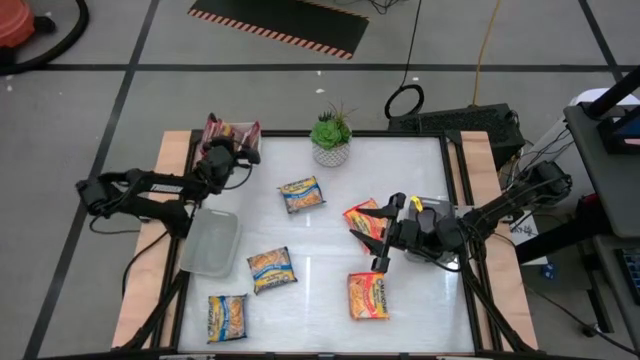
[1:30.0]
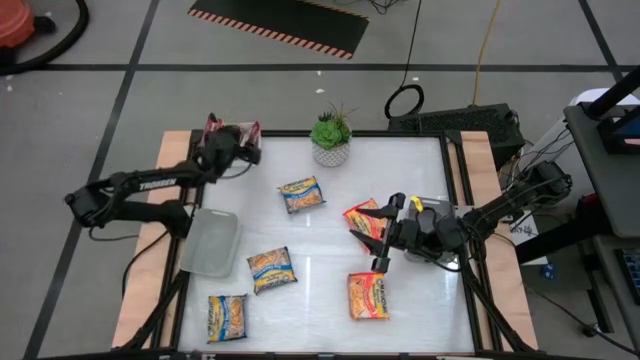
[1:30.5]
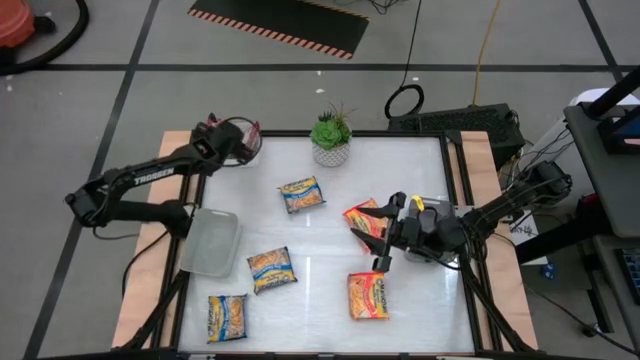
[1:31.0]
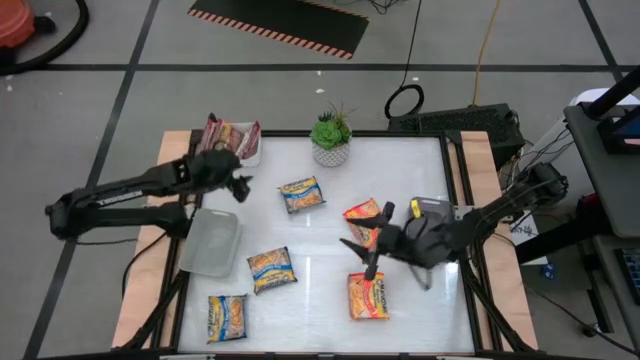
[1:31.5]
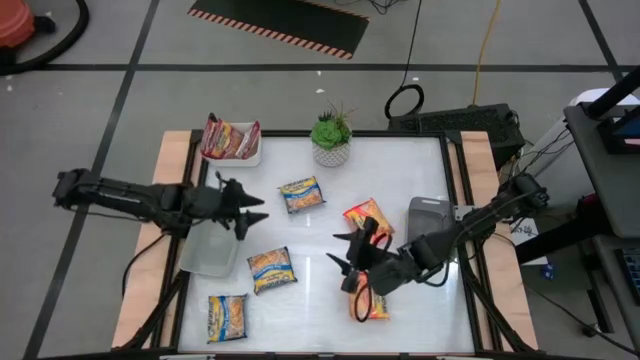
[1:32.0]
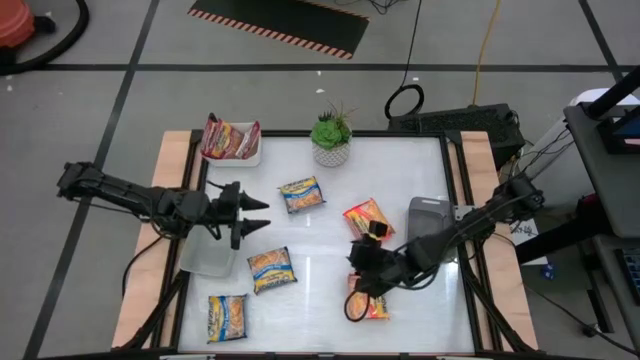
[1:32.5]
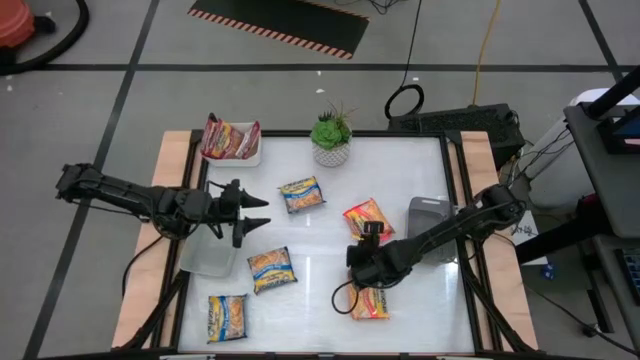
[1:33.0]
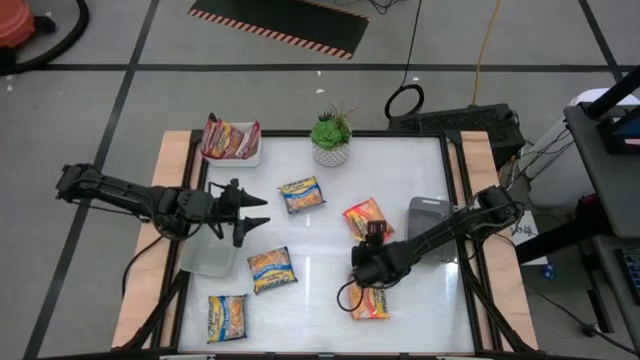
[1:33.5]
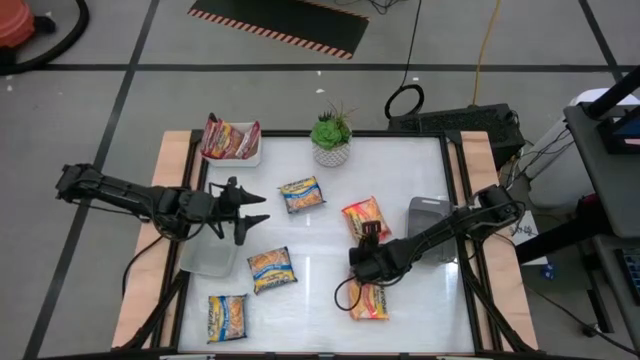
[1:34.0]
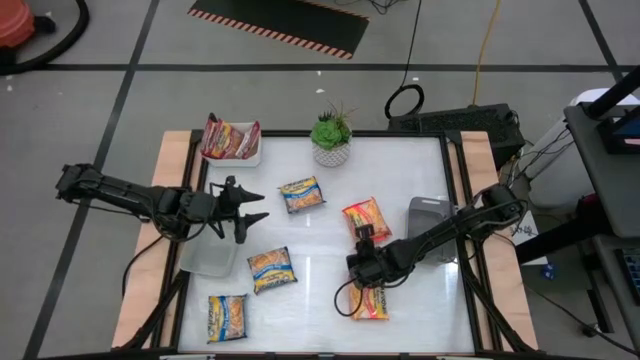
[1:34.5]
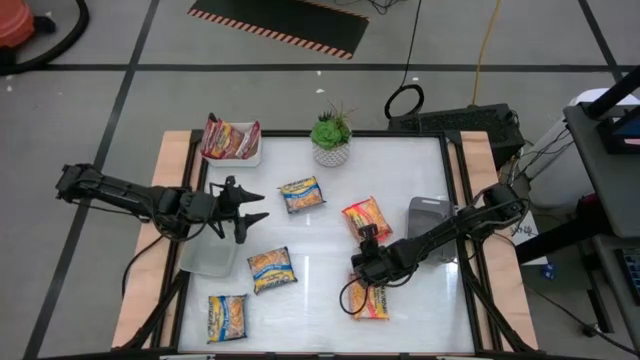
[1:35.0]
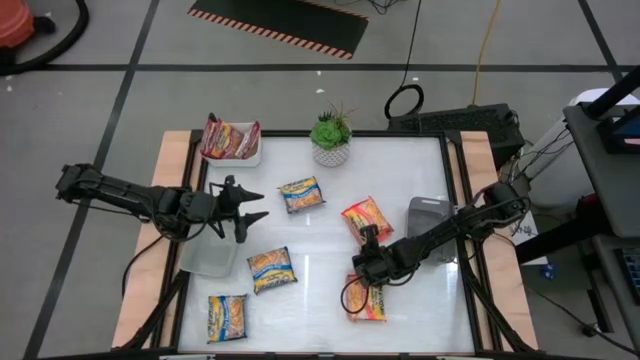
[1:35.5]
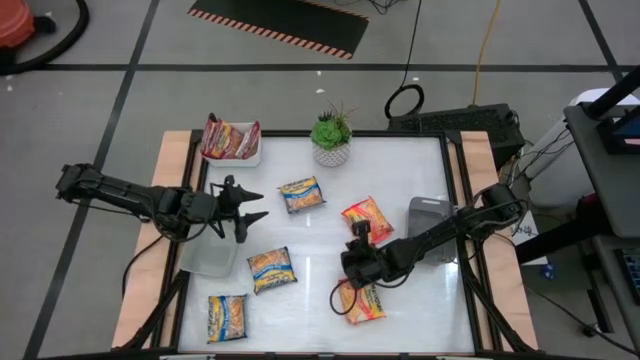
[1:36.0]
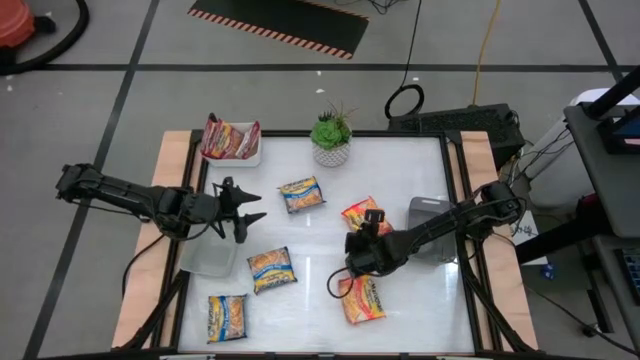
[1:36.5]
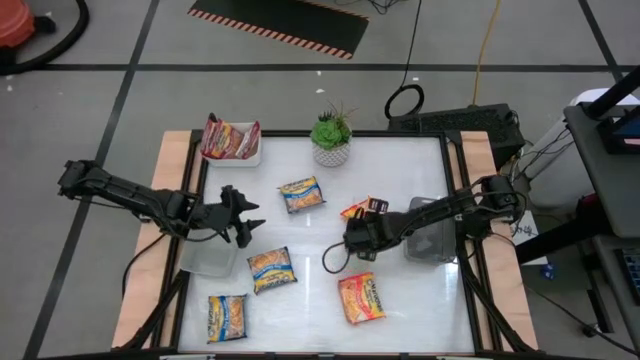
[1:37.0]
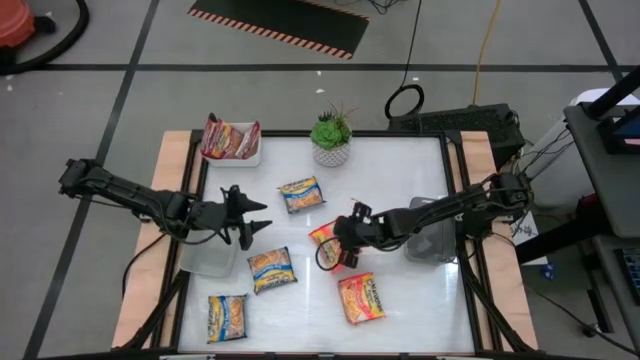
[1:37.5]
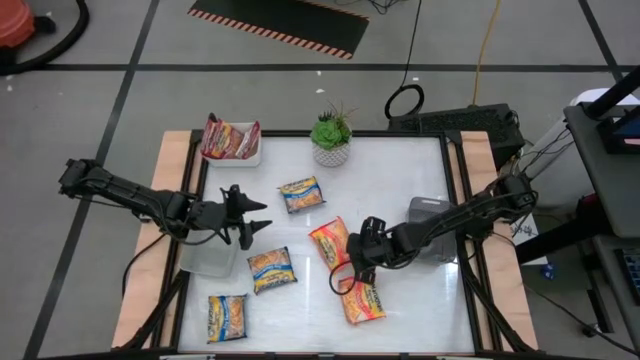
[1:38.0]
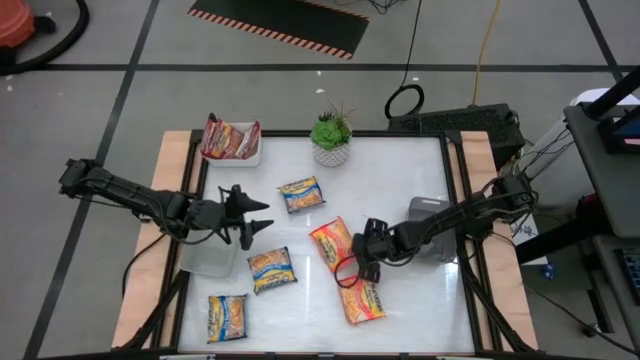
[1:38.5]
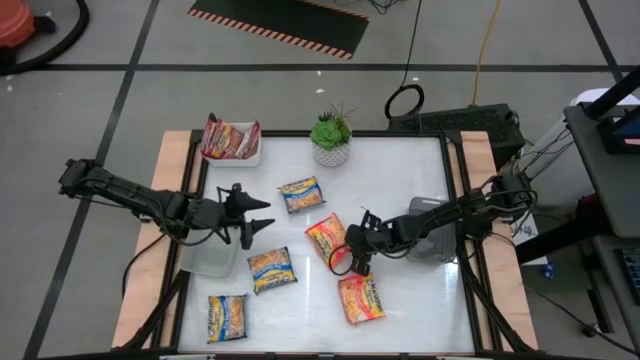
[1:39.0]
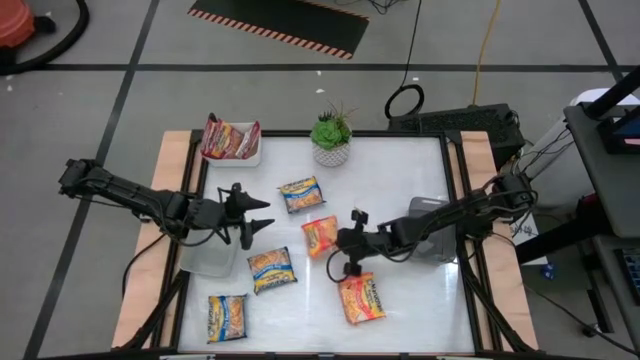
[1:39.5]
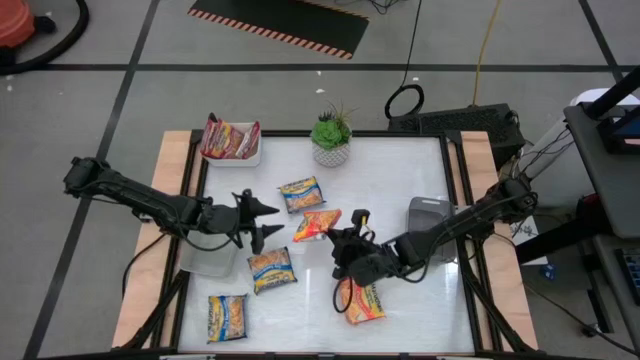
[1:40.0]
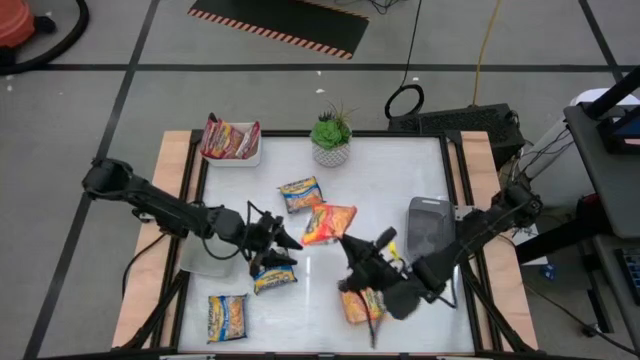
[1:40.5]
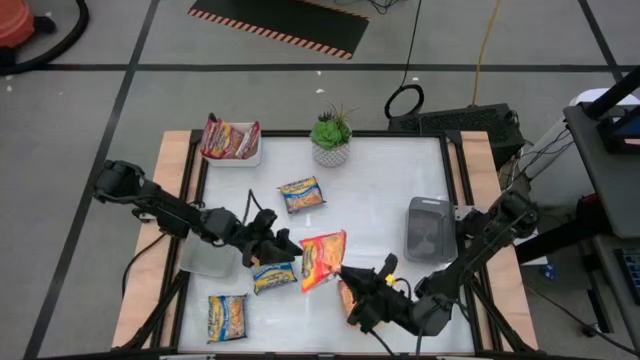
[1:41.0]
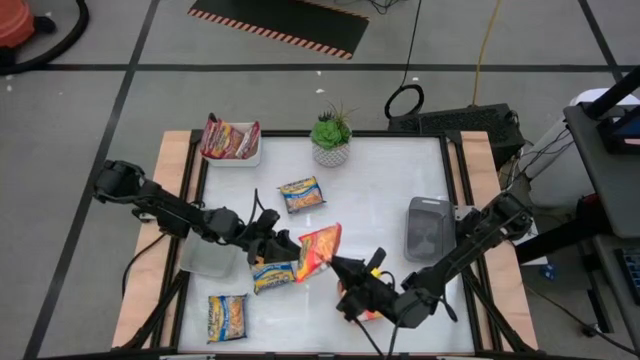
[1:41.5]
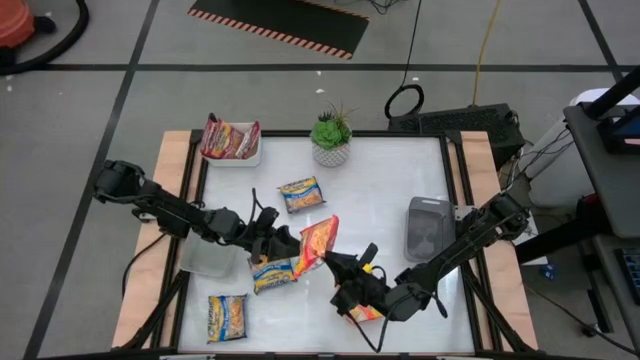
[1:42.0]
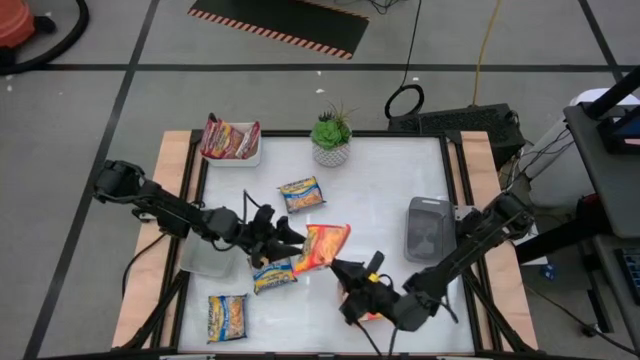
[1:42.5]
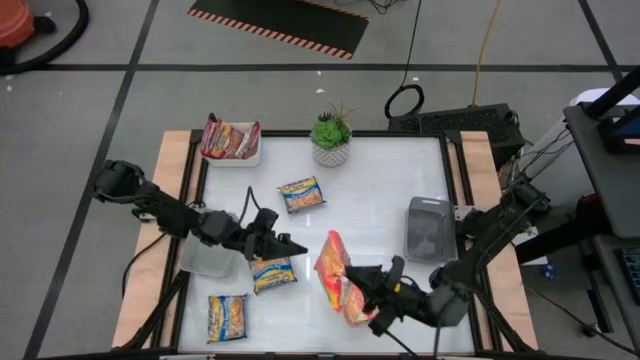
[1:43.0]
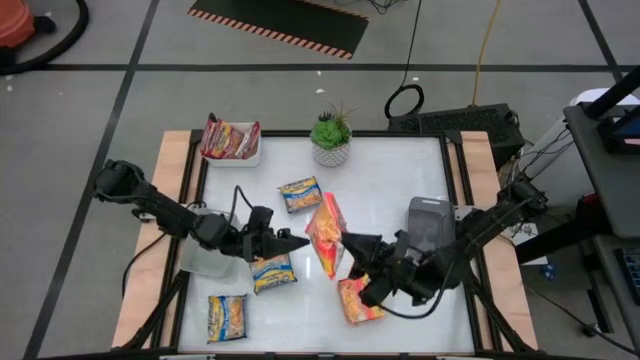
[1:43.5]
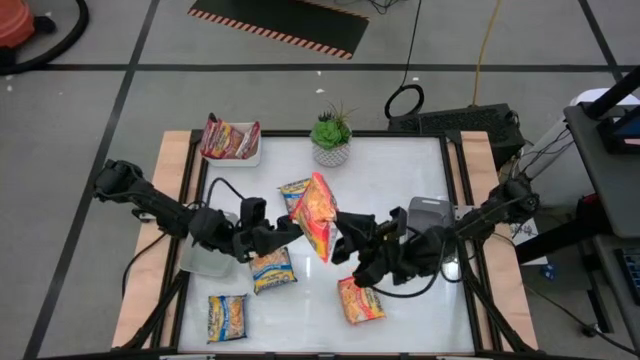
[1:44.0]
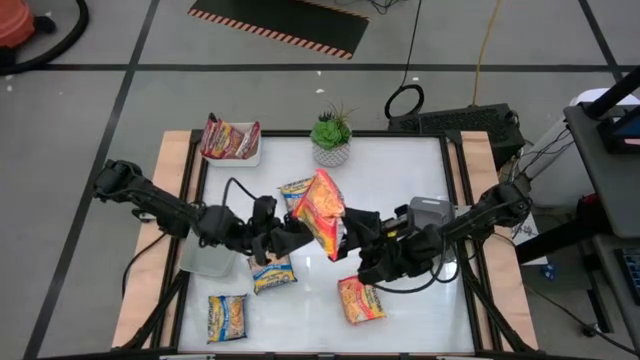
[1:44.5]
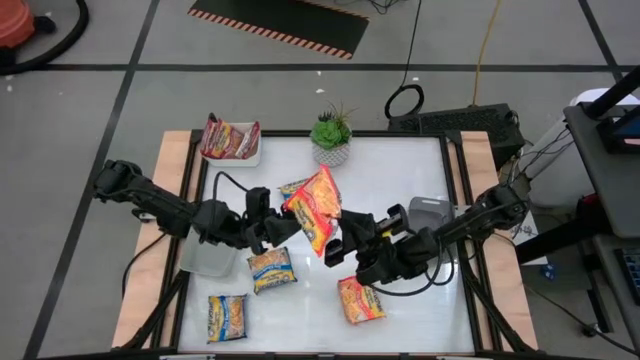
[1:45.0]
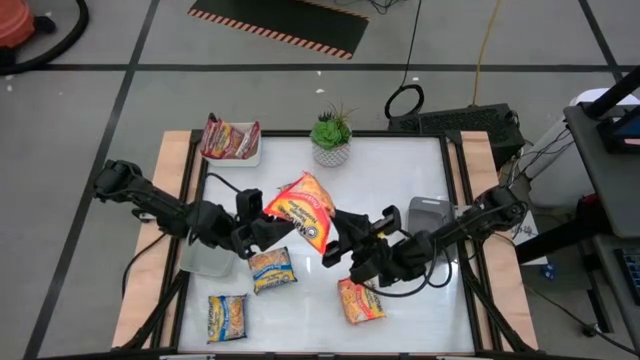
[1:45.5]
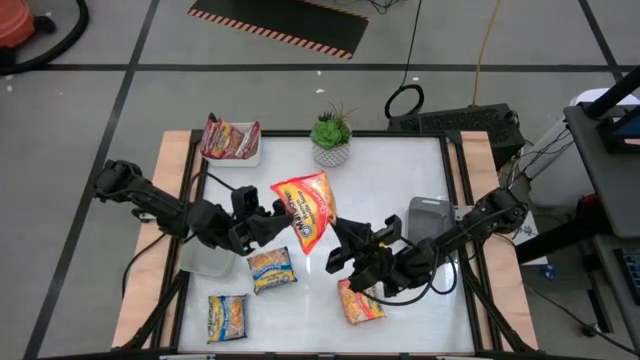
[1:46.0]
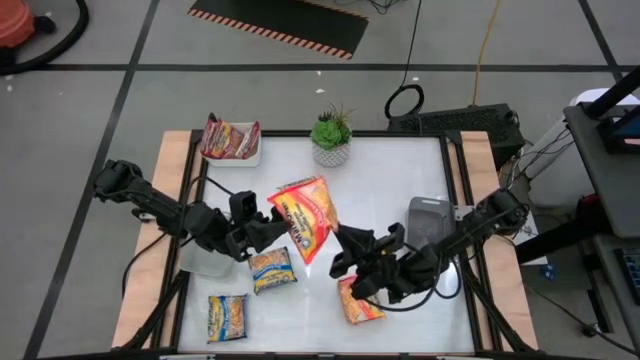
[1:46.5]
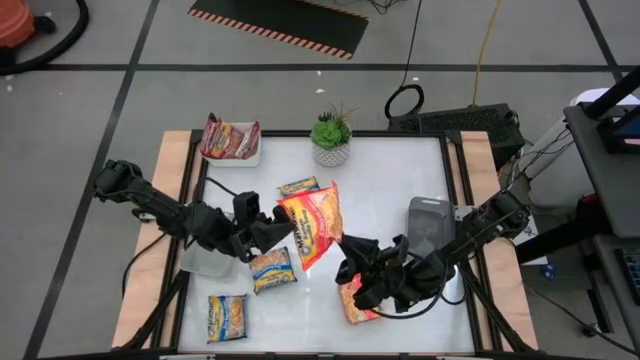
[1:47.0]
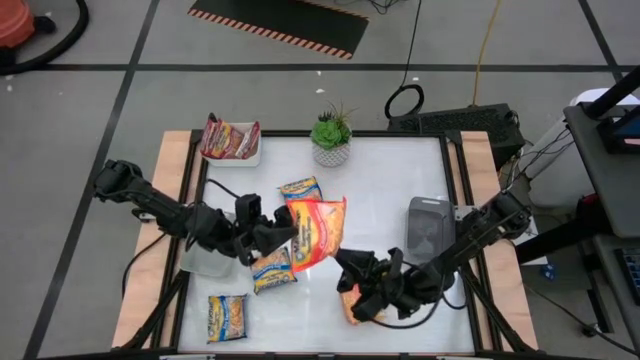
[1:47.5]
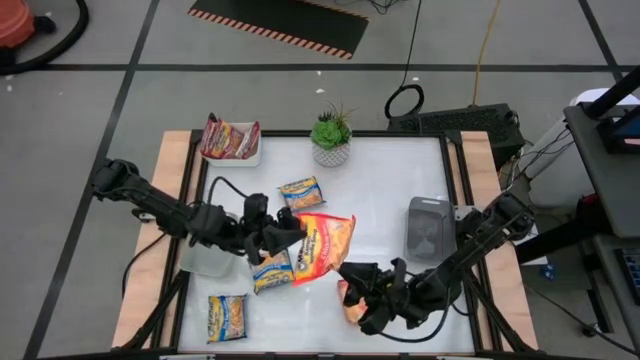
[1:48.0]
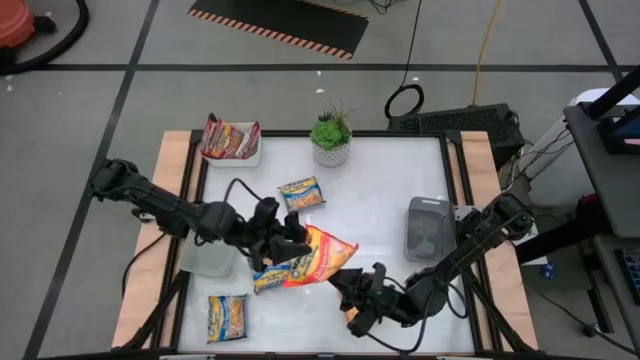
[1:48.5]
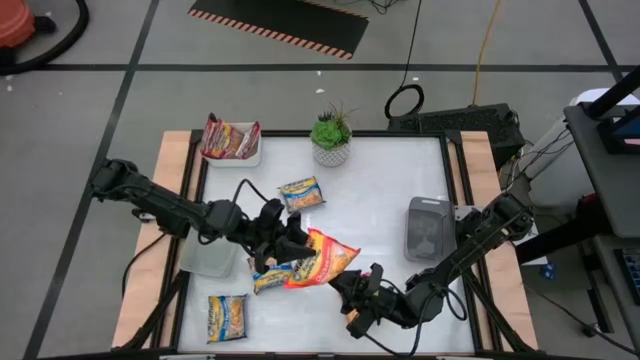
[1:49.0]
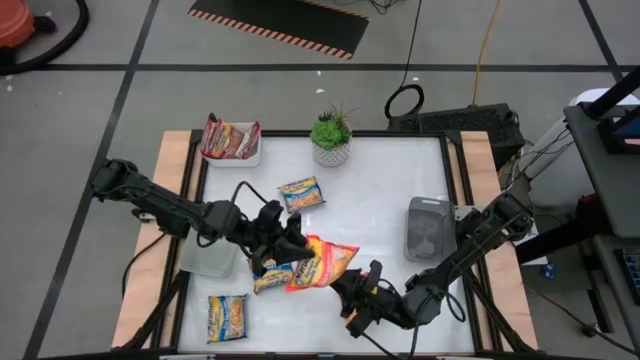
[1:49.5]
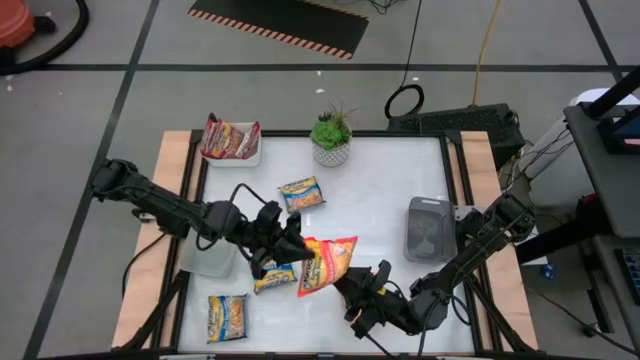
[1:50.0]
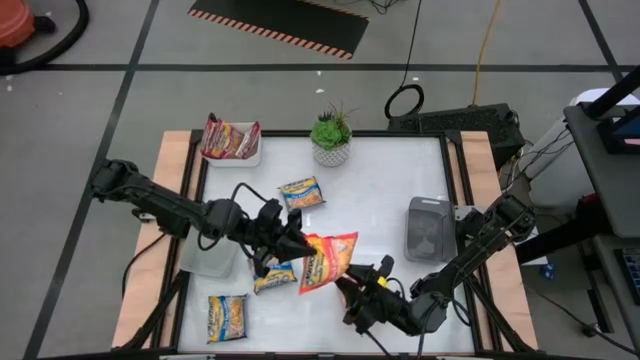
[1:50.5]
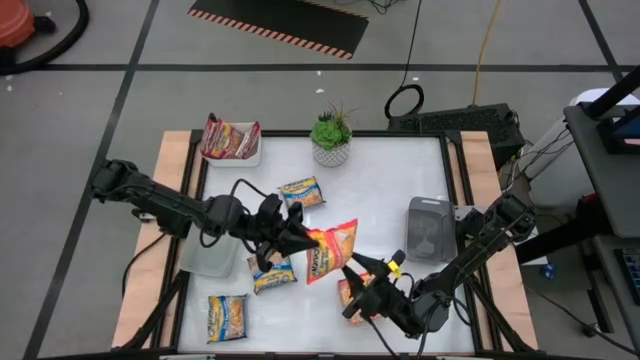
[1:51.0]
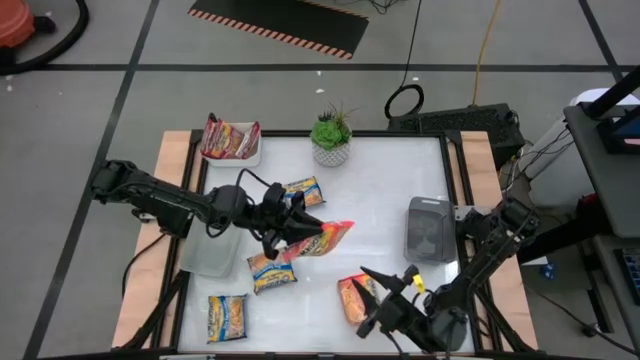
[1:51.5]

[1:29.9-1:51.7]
Task: Sort Maruchan noodles
Put the top orange noodle pack into the black bin
